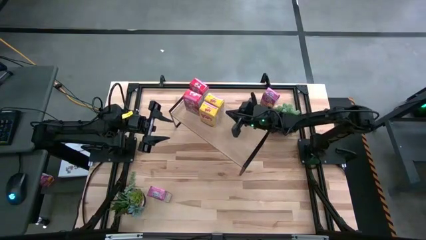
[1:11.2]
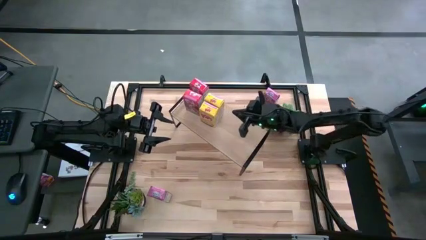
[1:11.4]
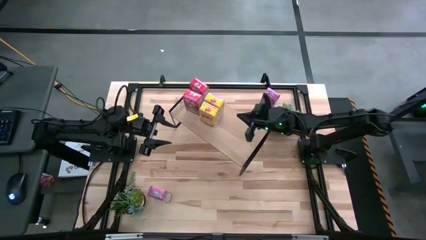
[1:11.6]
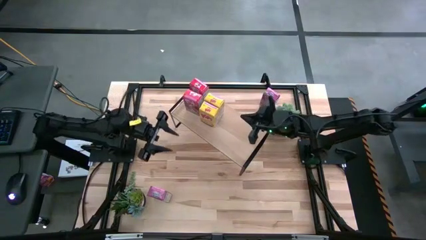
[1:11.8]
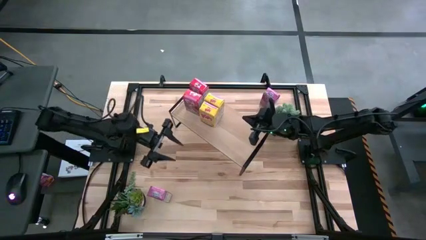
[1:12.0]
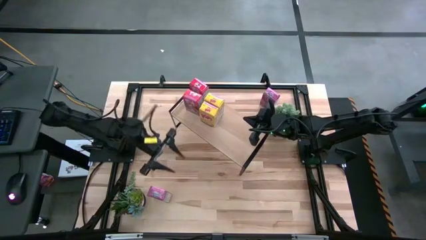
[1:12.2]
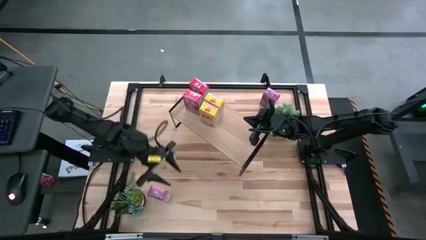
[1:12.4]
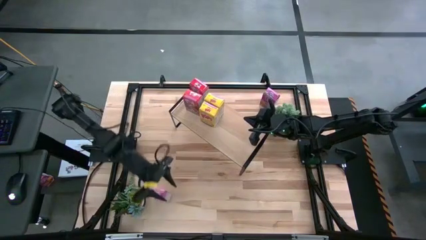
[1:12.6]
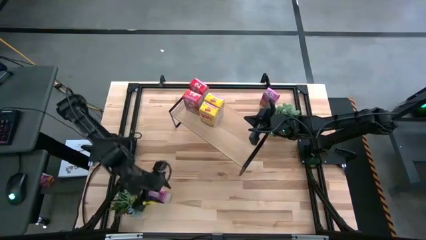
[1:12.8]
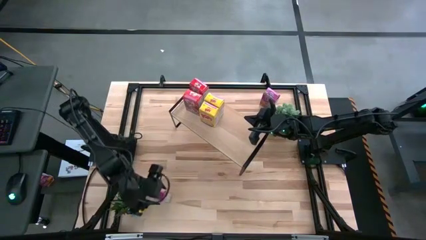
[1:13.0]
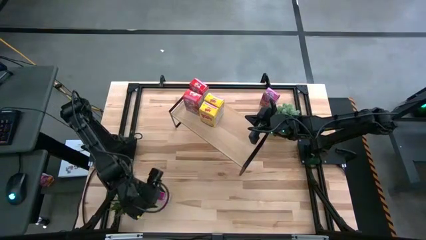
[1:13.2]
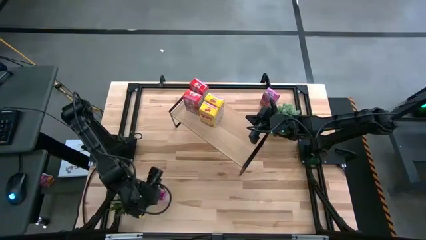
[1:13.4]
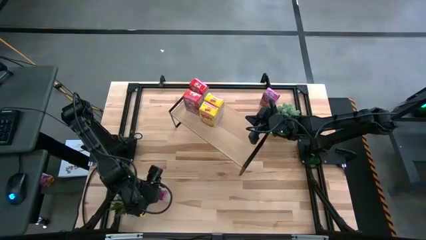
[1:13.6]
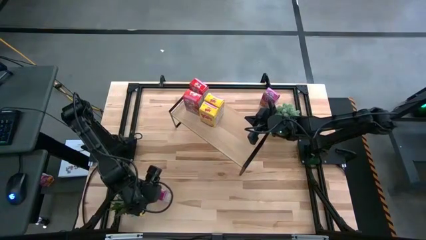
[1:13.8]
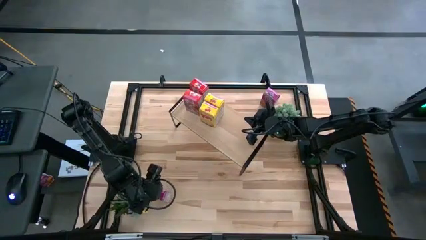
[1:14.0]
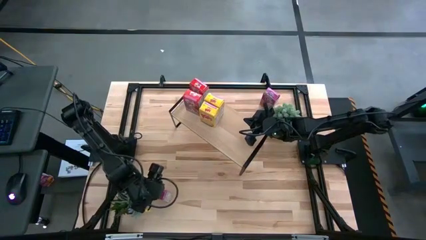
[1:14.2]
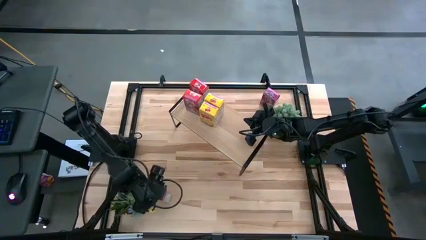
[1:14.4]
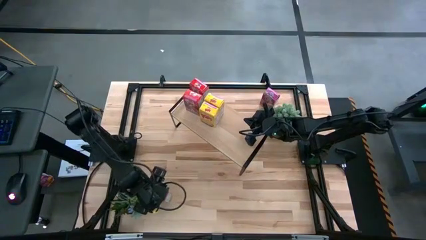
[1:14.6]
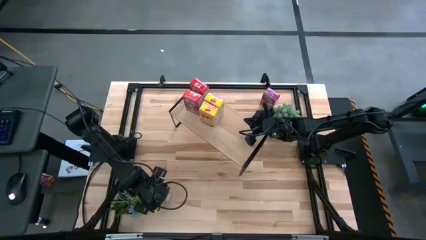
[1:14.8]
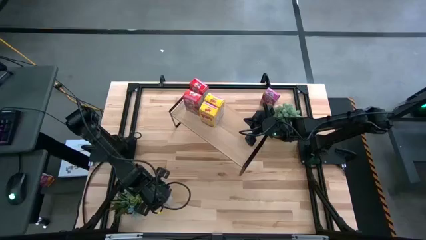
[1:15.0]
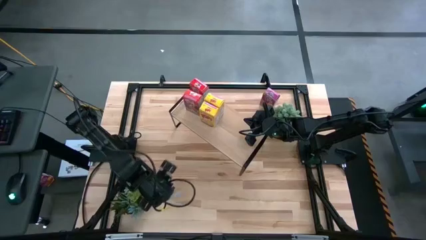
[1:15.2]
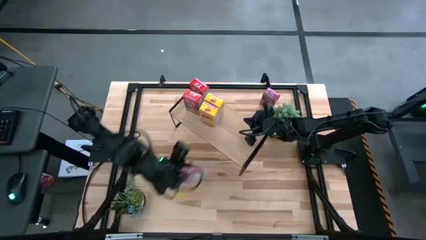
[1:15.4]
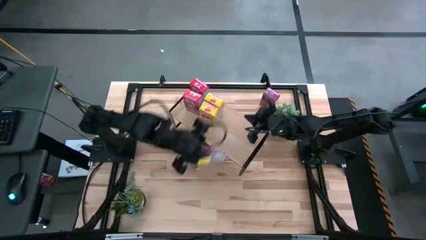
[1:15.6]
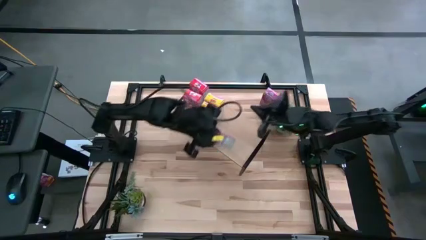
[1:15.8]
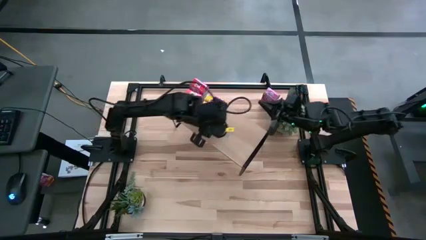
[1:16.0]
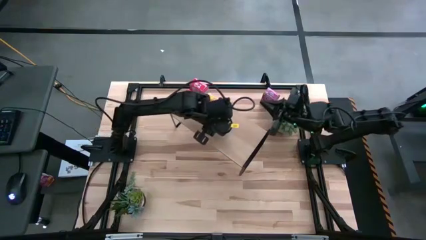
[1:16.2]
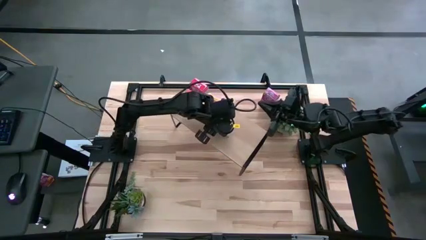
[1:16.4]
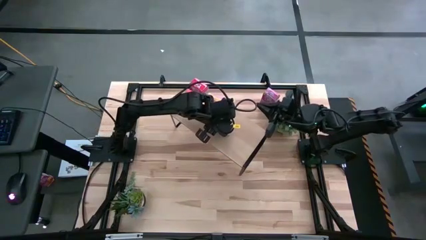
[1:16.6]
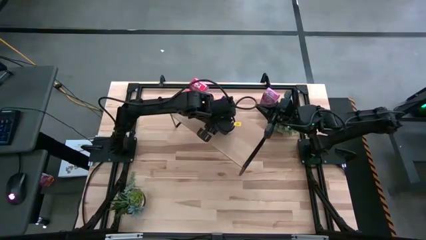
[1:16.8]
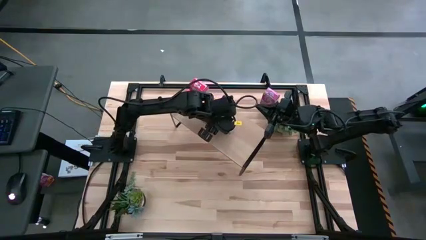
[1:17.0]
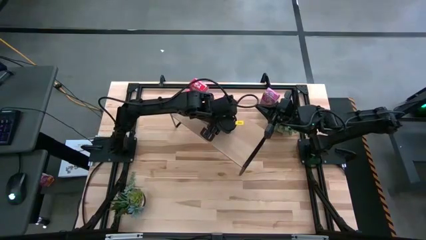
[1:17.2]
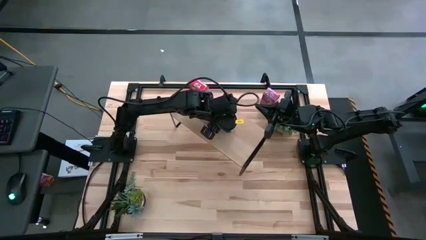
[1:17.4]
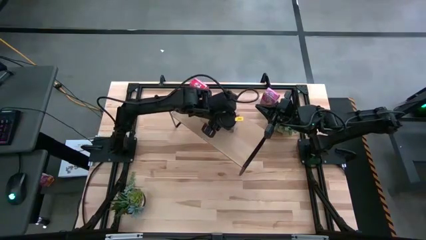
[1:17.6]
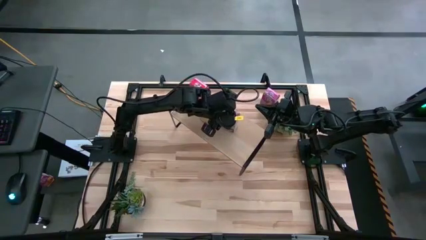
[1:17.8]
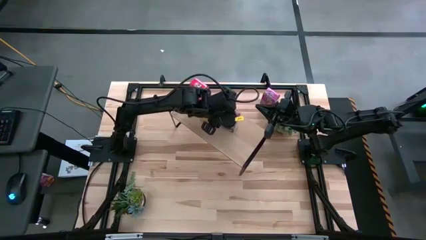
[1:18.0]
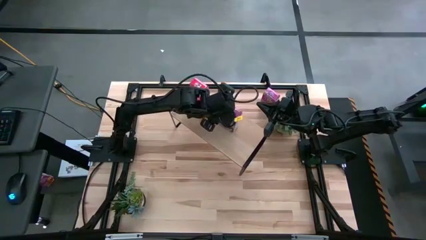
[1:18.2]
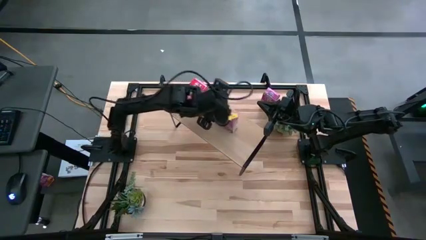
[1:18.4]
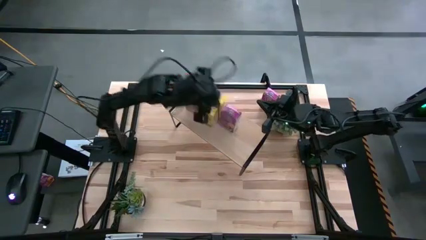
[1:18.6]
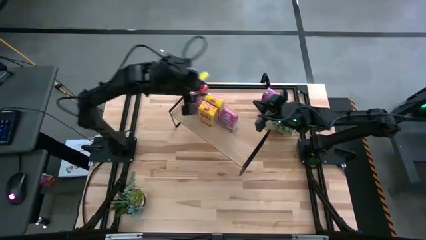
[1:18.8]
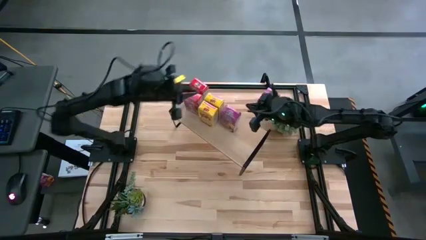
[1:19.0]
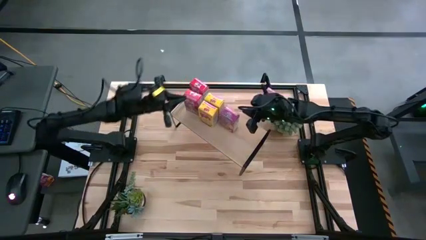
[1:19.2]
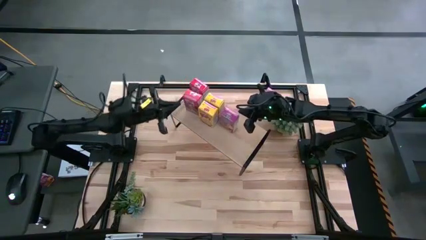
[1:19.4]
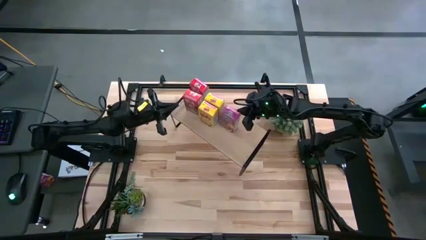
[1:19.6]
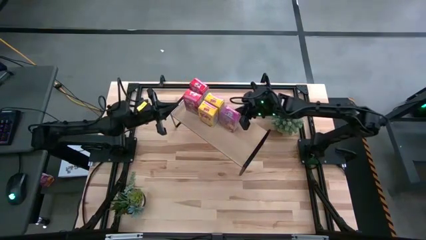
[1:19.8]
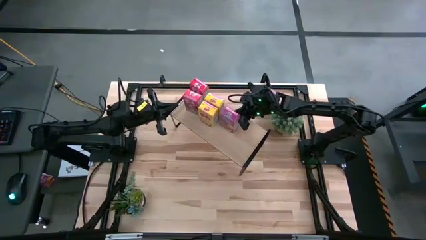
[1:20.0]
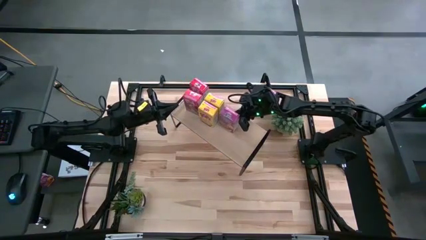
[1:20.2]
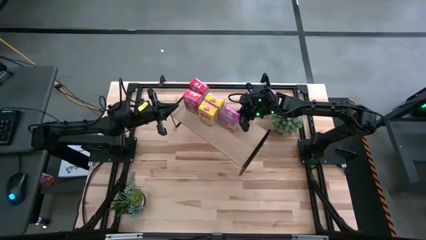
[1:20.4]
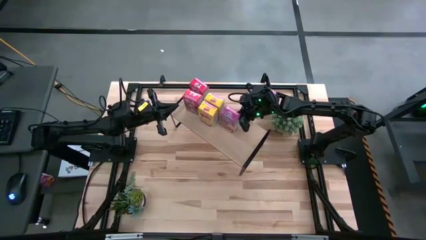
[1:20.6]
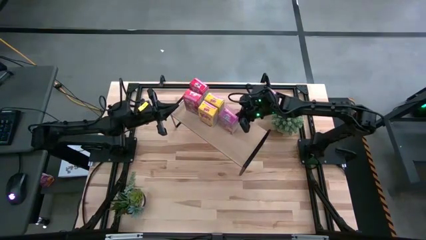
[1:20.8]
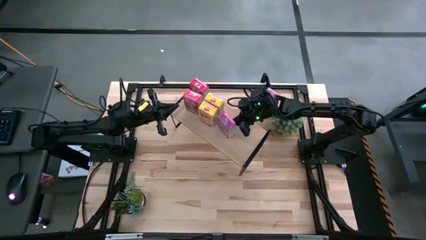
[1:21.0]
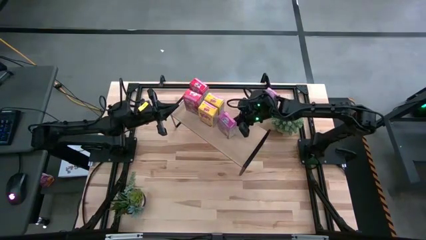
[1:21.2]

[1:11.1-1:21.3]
Task: Stack cereal on shelf
Put the bottom purple cereal box on the shelf

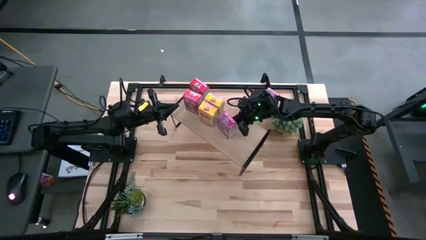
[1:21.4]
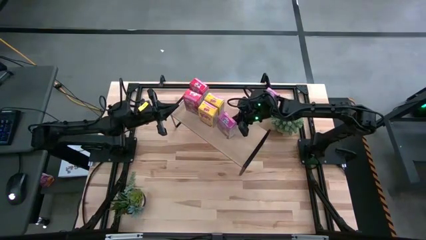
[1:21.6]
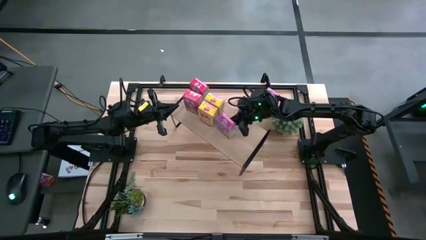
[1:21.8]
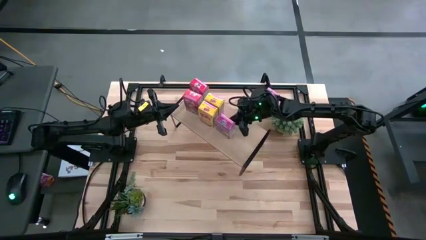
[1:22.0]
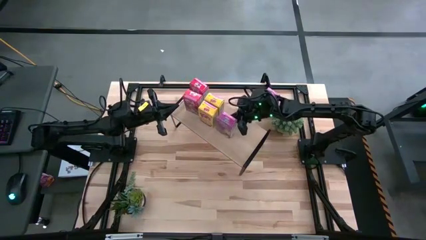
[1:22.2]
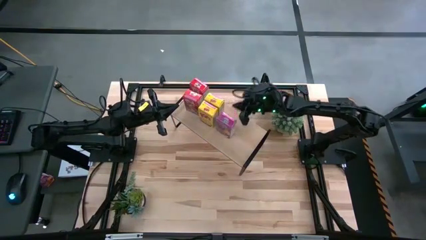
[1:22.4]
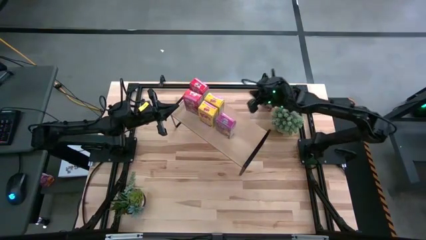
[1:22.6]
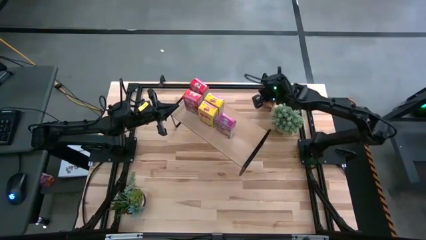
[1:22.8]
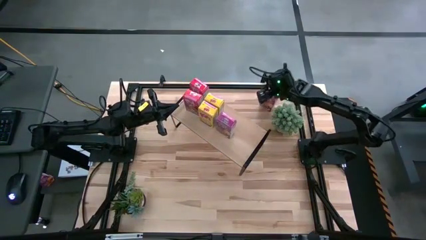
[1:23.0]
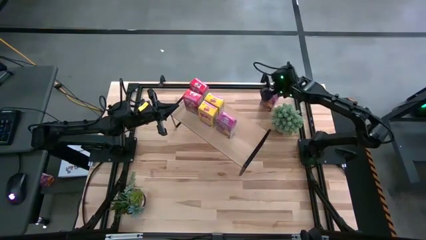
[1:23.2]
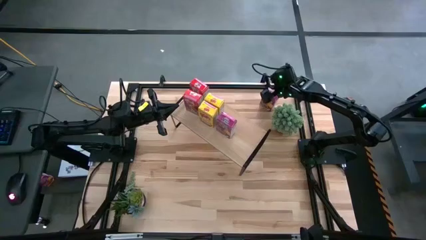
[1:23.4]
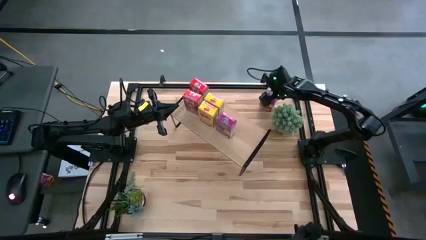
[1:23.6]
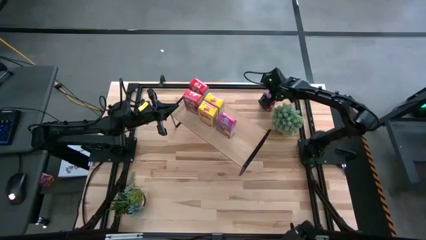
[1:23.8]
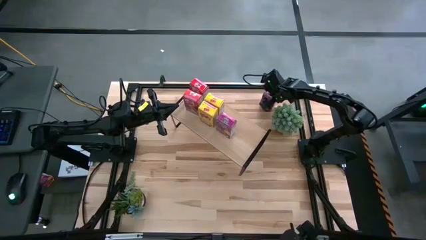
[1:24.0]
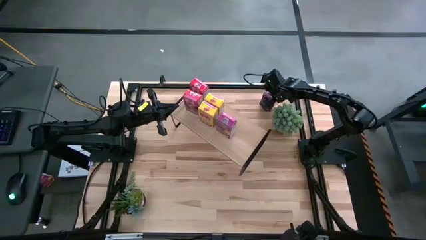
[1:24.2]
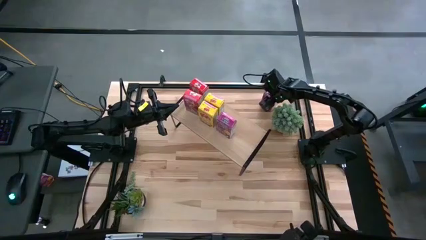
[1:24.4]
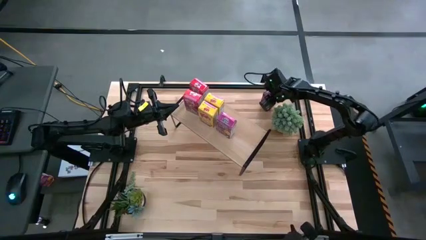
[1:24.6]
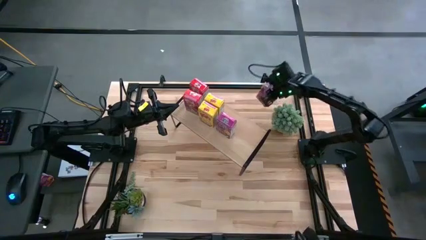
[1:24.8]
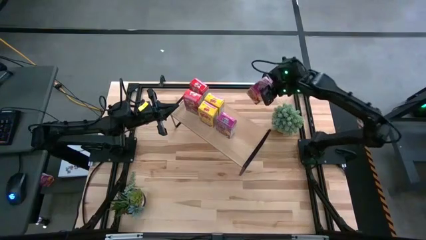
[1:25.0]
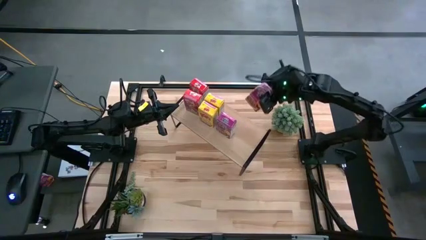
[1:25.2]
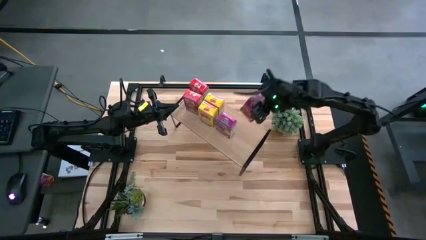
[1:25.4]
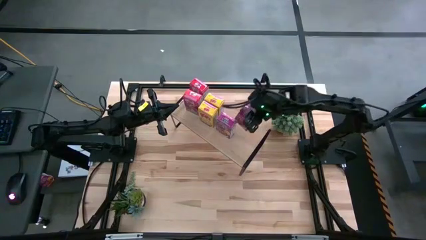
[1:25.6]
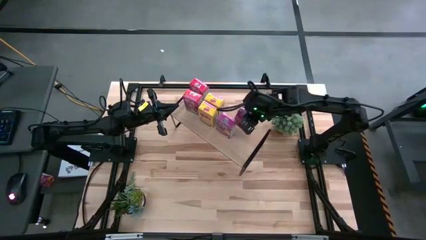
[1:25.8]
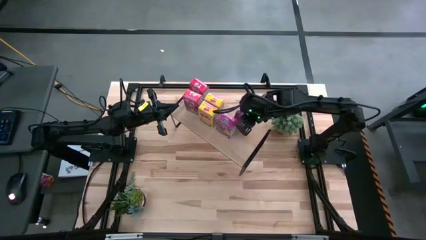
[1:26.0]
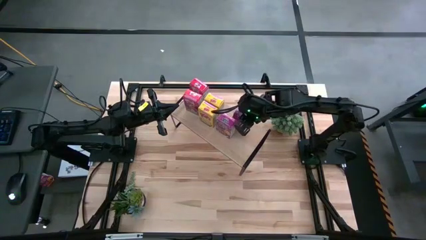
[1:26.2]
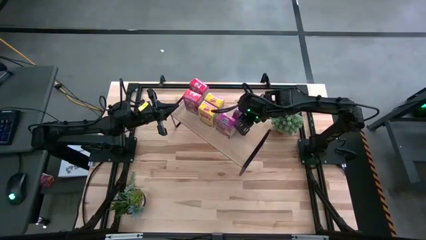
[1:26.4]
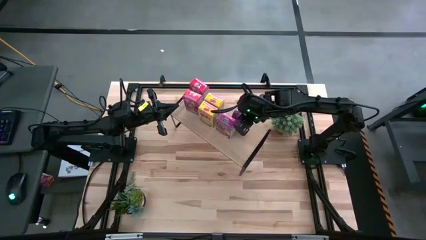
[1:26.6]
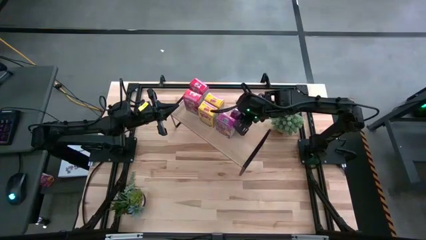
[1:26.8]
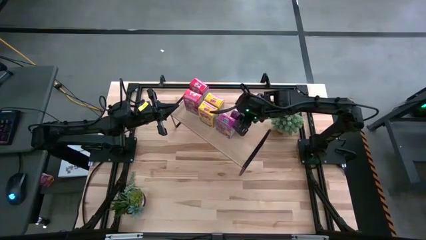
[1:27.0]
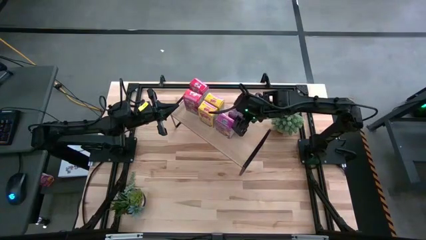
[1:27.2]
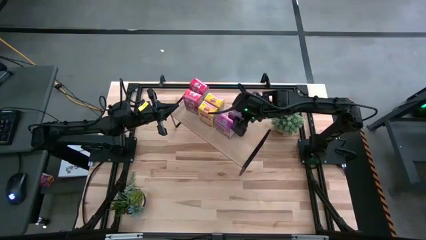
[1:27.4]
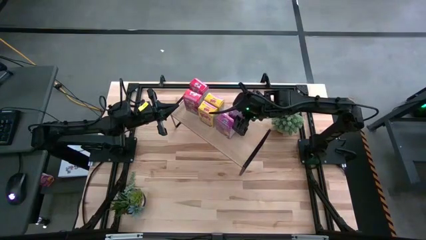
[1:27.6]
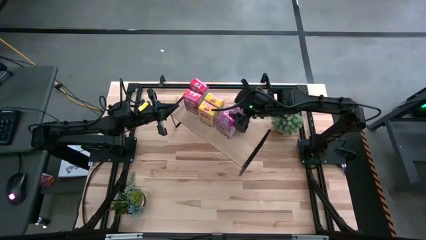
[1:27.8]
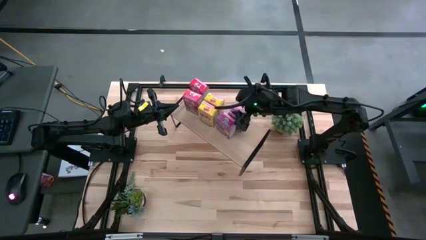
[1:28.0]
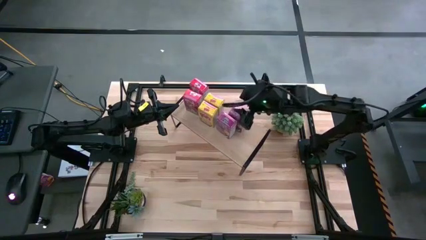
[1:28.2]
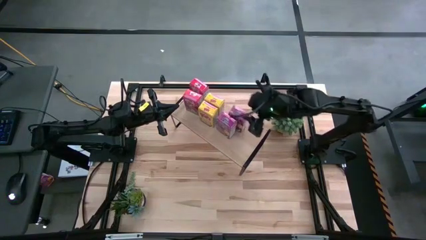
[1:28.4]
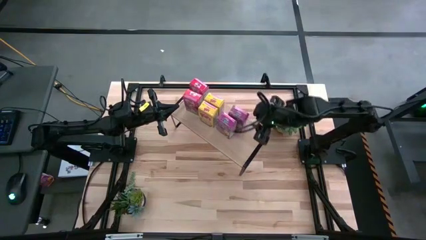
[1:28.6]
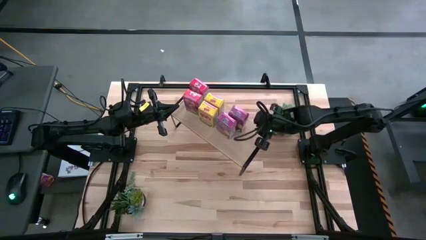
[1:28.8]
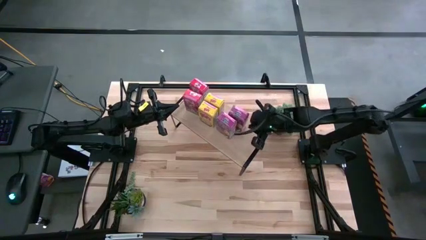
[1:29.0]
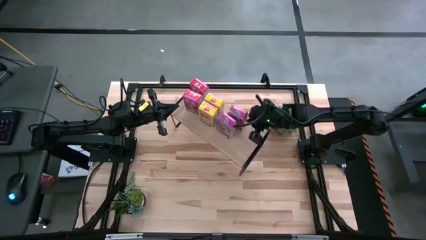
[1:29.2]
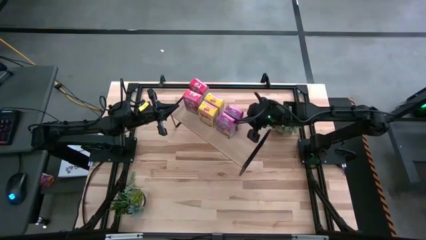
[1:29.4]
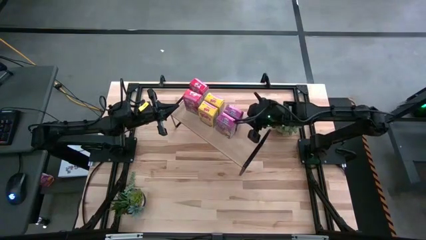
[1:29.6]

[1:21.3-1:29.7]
Put the purple cereal box on the shelf
